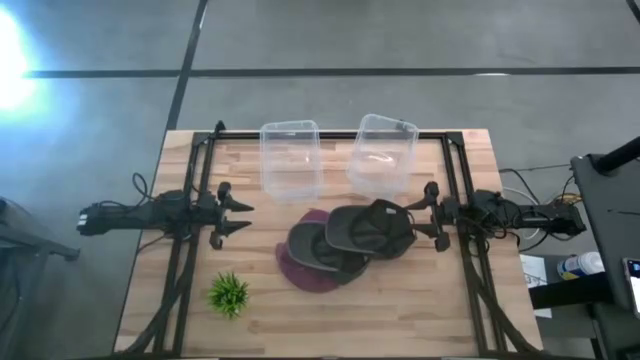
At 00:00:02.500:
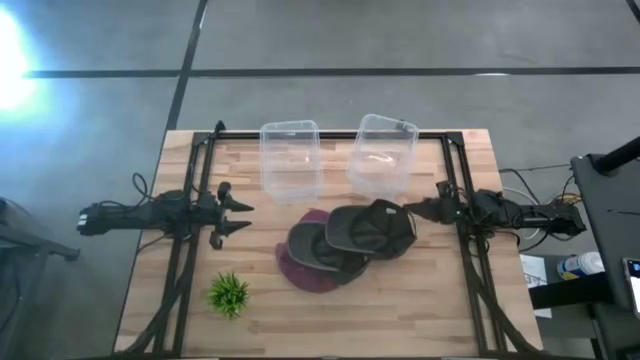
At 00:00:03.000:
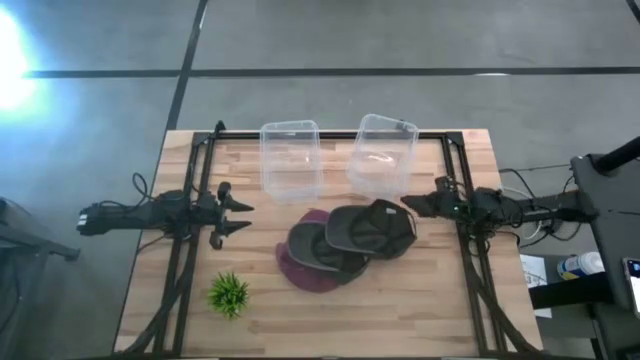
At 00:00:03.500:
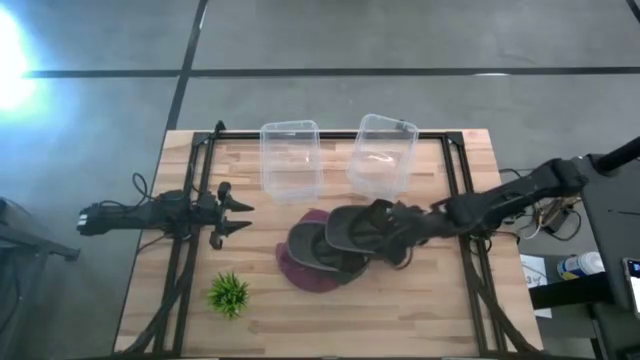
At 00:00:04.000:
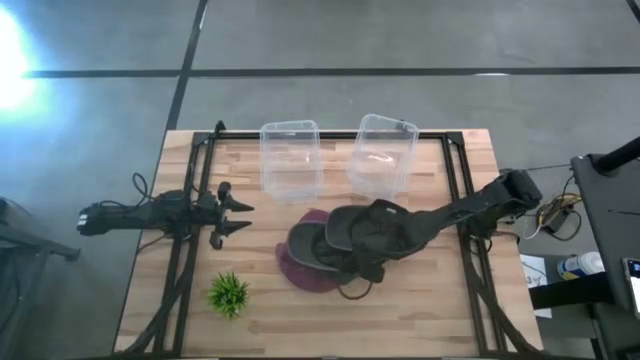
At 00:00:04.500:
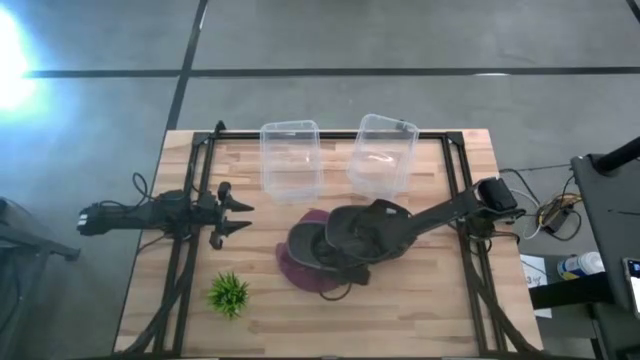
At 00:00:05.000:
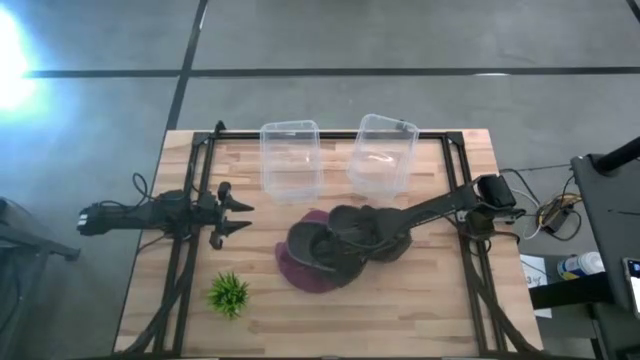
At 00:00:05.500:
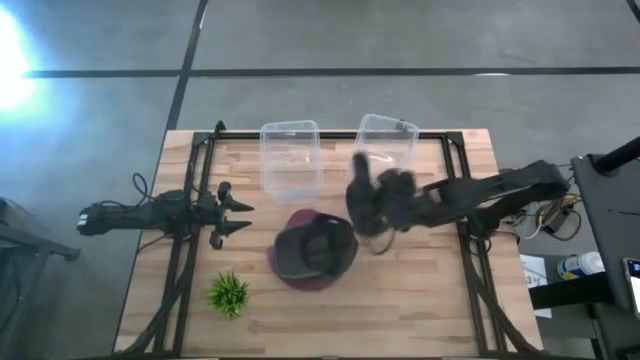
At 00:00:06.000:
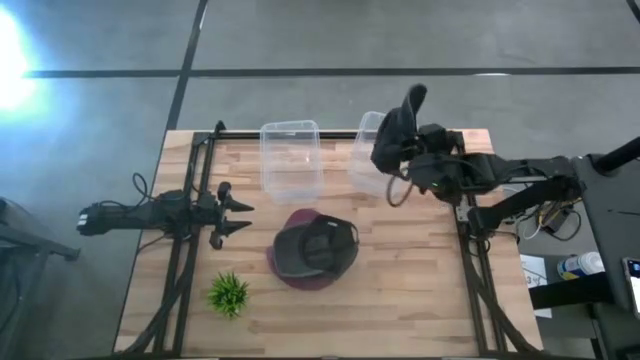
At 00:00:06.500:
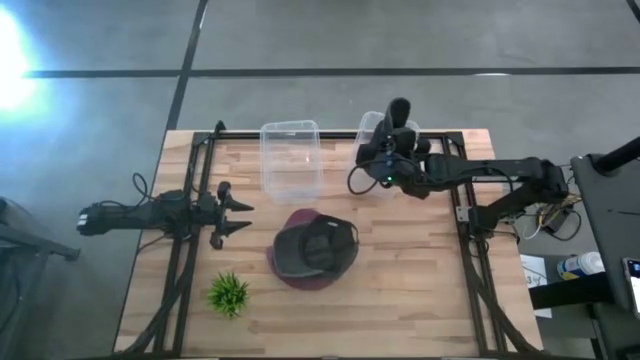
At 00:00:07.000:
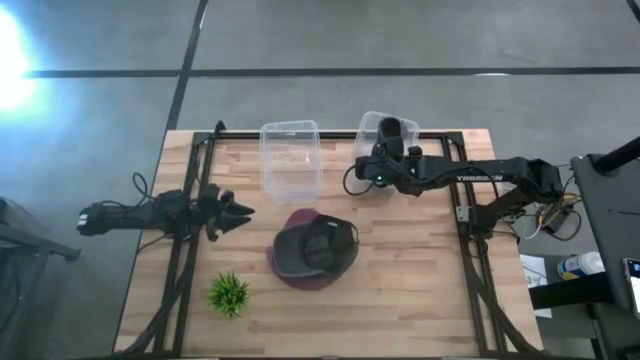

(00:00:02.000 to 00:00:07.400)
Task: Pick & Place hat
Put the right black cap into the right transparent bin

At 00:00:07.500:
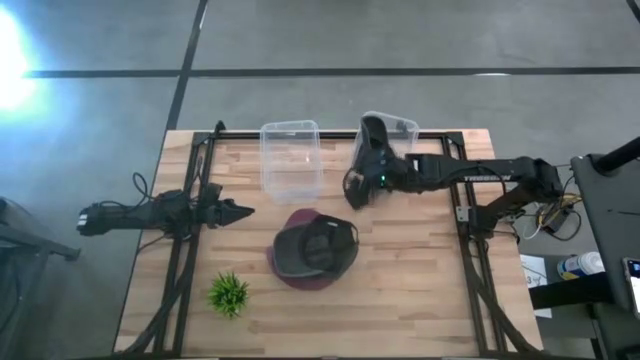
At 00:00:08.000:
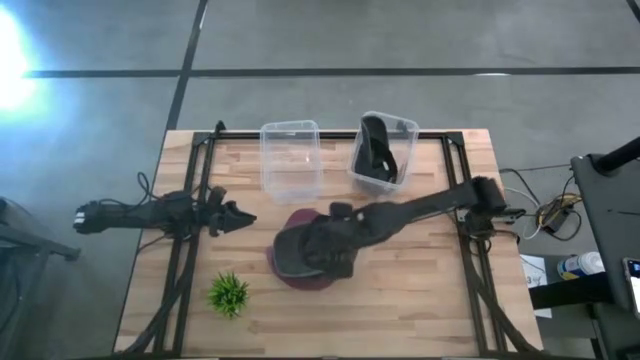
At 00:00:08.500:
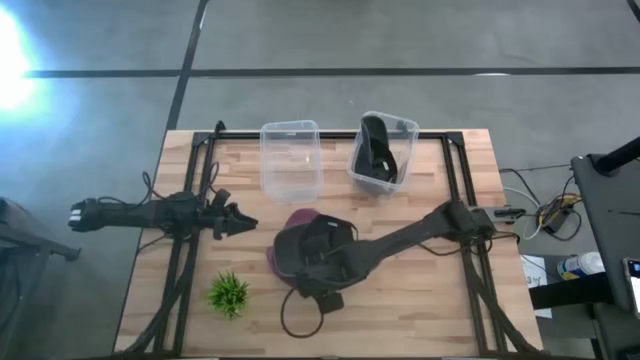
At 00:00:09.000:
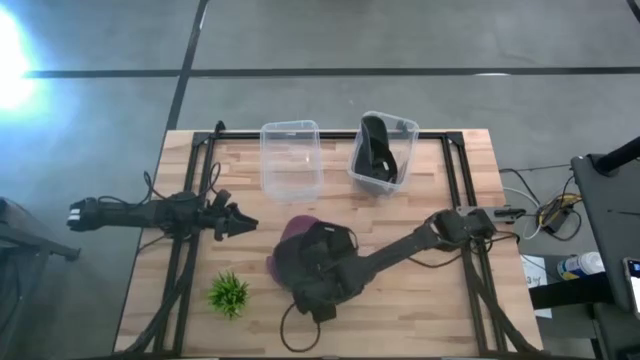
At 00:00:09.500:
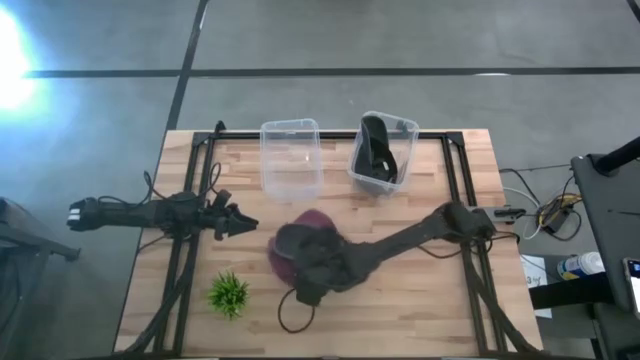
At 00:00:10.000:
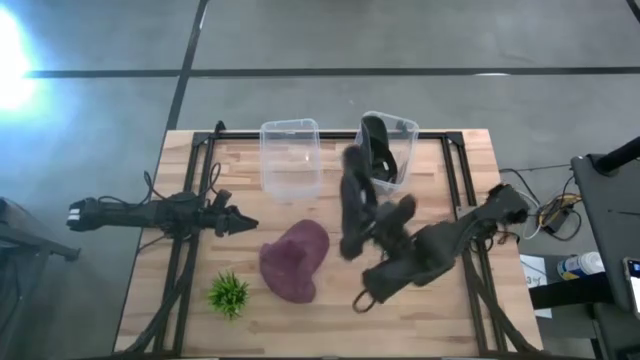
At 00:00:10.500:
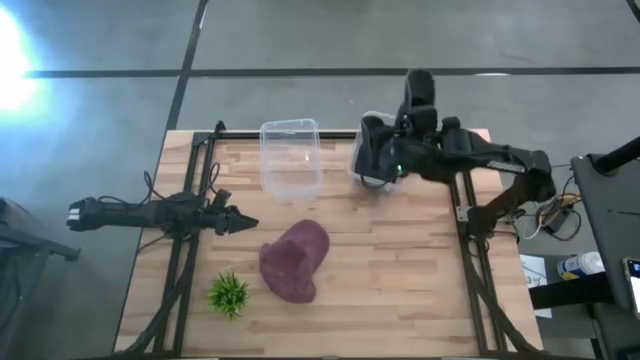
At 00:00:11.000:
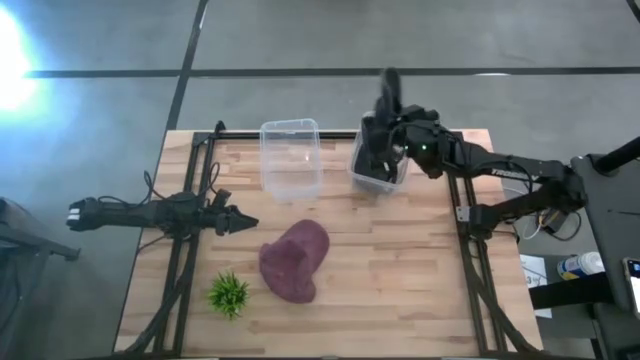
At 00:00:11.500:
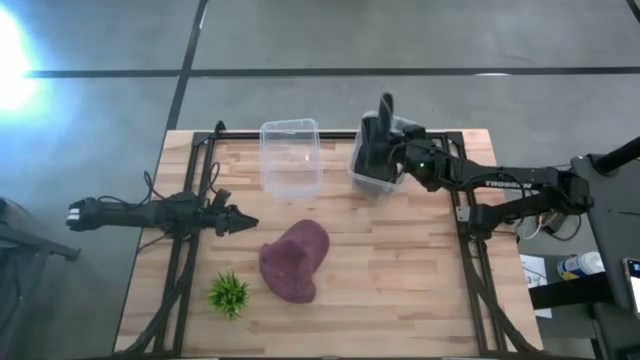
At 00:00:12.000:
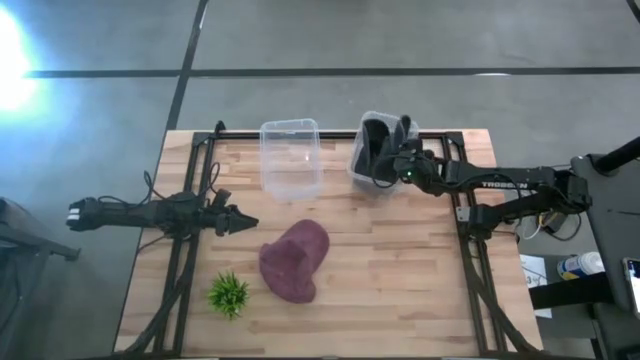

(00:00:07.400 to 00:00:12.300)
Put the black cap into the right transparent bin

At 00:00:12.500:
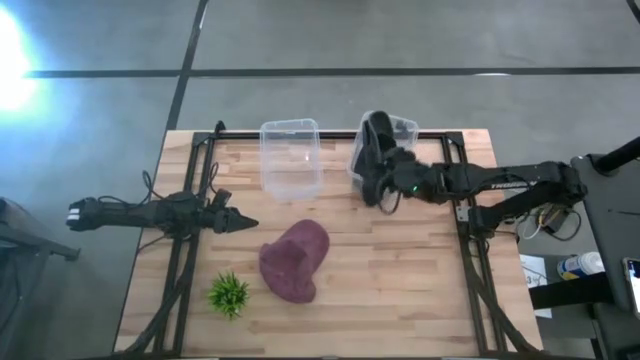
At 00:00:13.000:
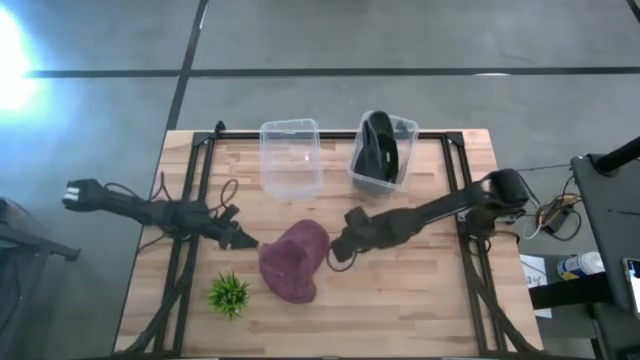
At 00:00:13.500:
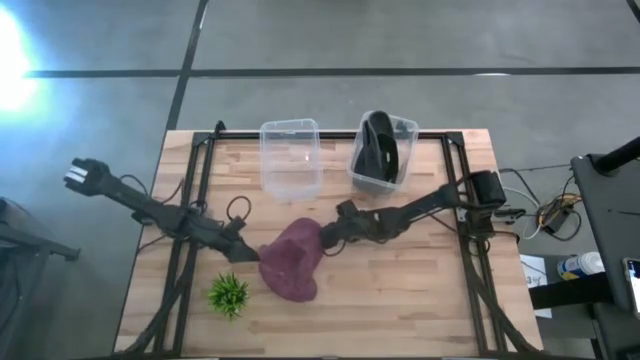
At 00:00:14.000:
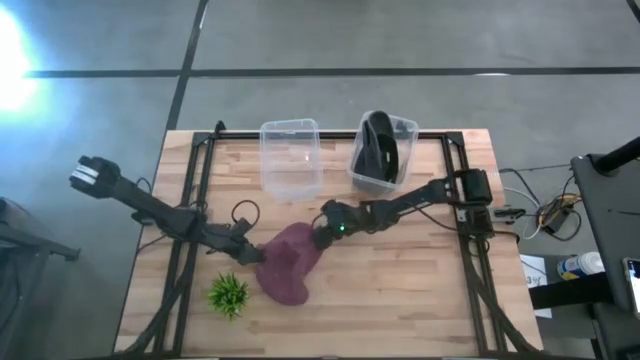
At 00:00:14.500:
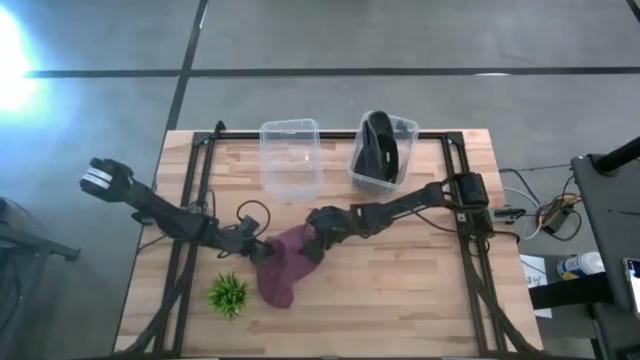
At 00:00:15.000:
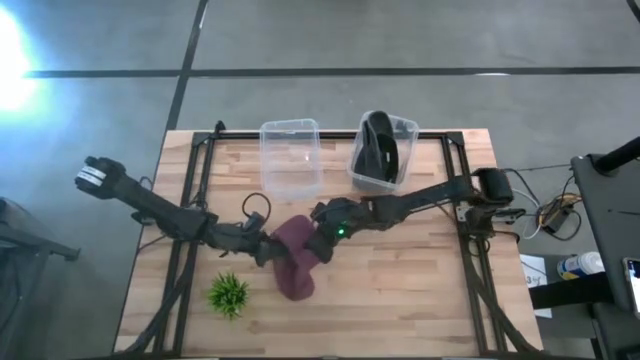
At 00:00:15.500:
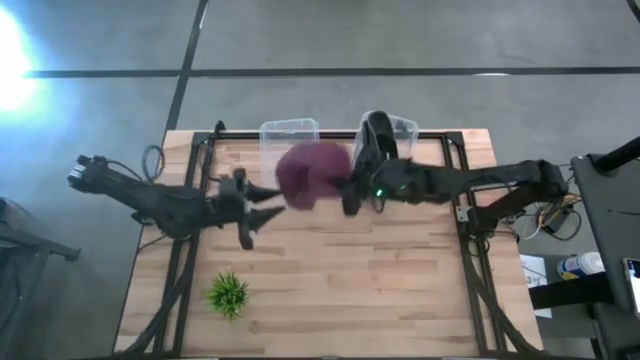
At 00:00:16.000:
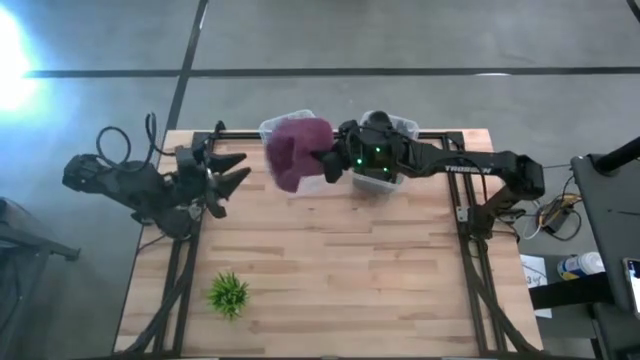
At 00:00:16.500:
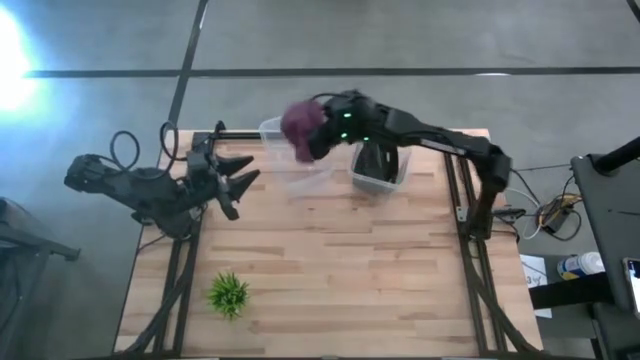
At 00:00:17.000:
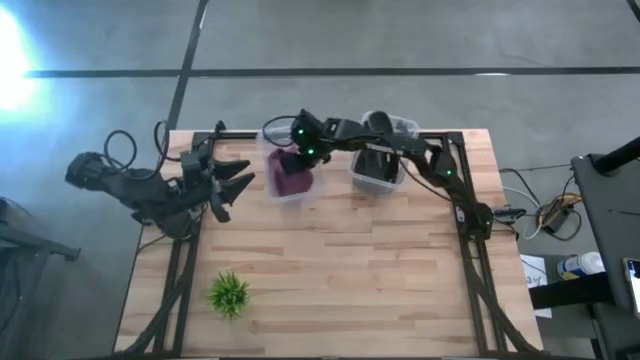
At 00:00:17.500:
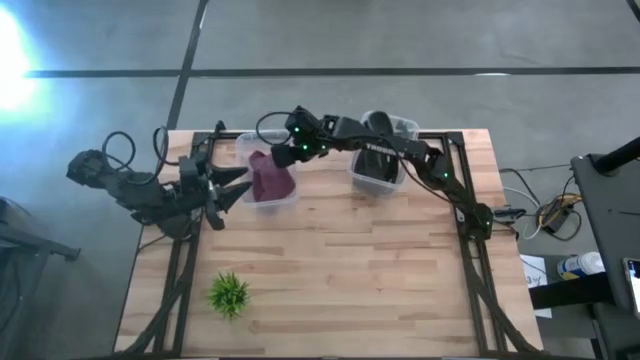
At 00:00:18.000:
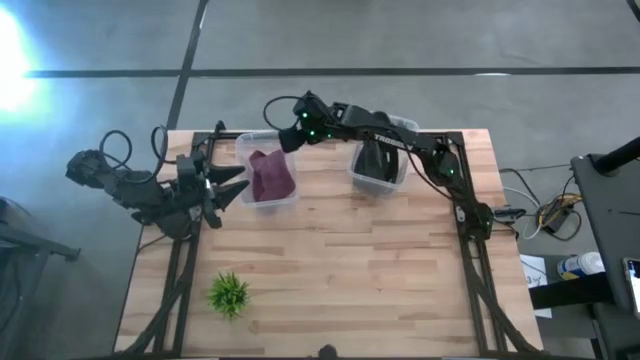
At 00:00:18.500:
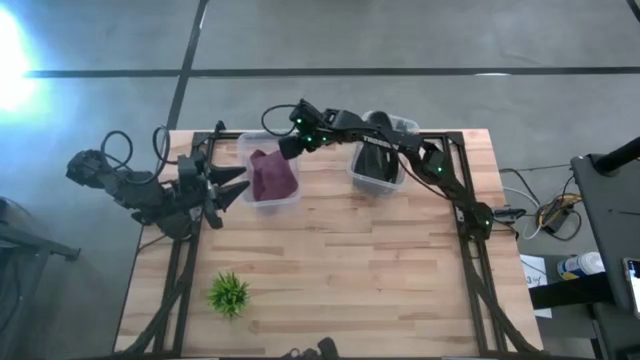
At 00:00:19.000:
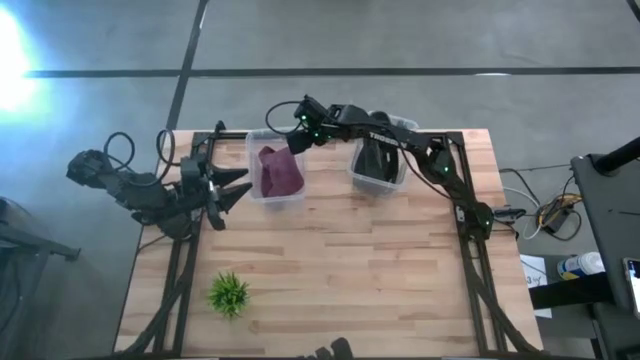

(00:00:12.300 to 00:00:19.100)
Put the red cap into the left transparent bin

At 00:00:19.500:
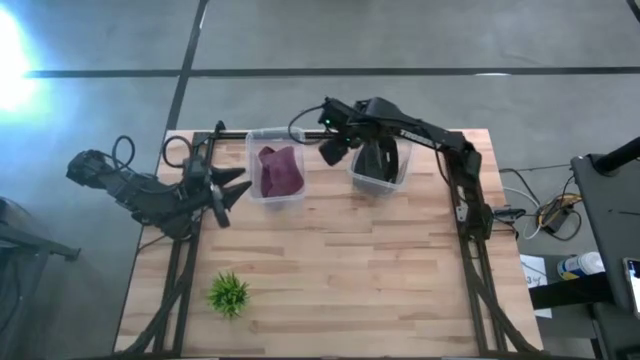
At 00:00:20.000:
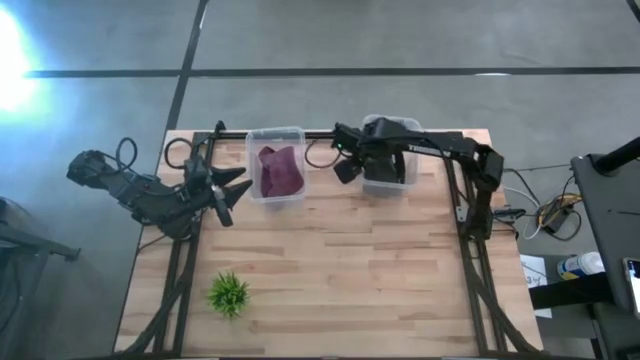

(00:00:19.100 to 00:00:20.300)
Adjust the right transparent bin

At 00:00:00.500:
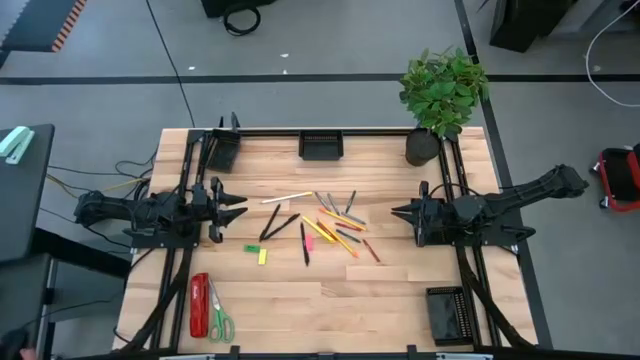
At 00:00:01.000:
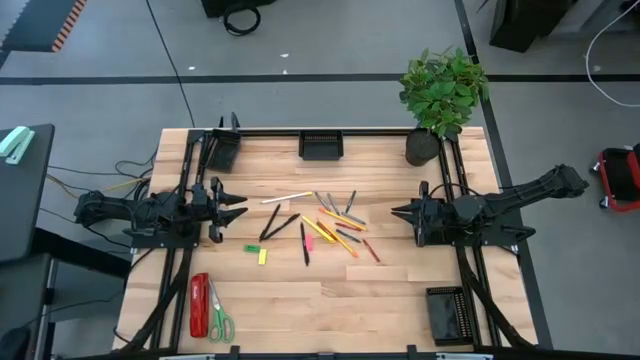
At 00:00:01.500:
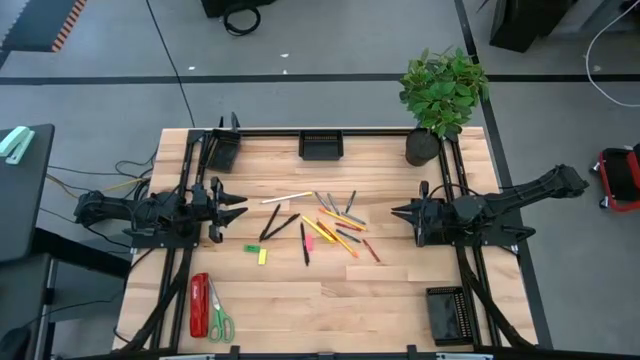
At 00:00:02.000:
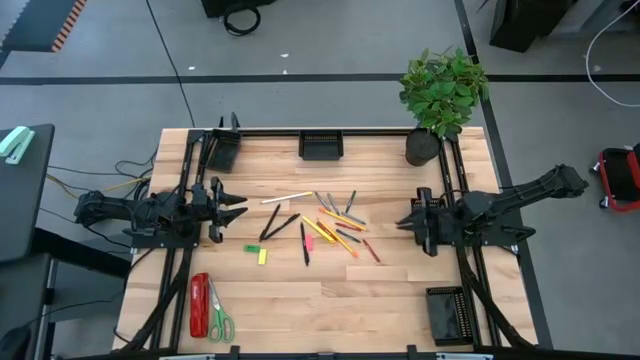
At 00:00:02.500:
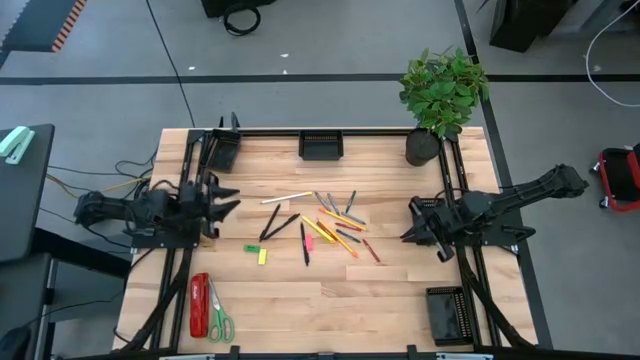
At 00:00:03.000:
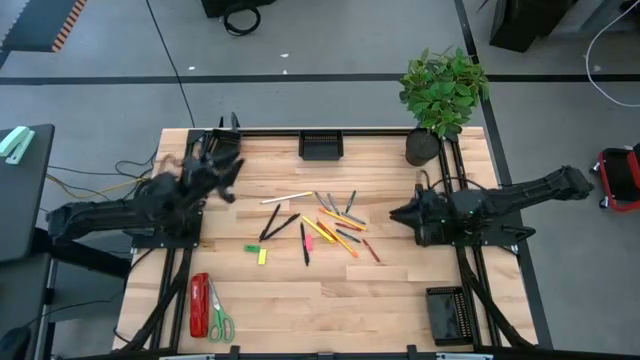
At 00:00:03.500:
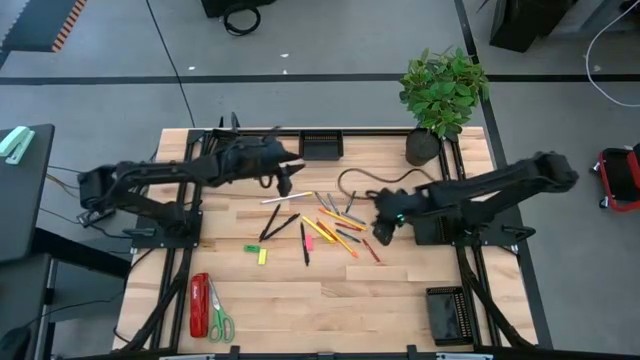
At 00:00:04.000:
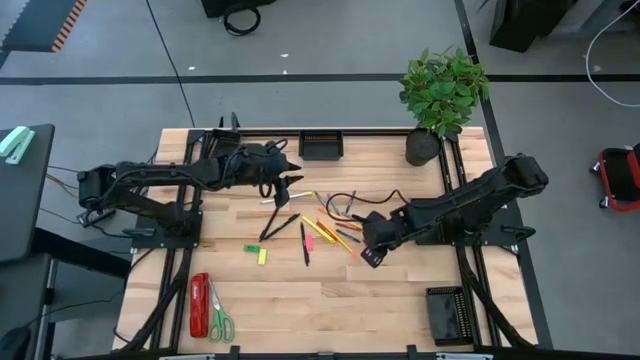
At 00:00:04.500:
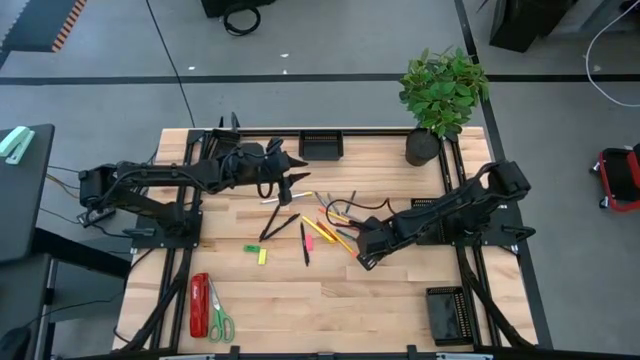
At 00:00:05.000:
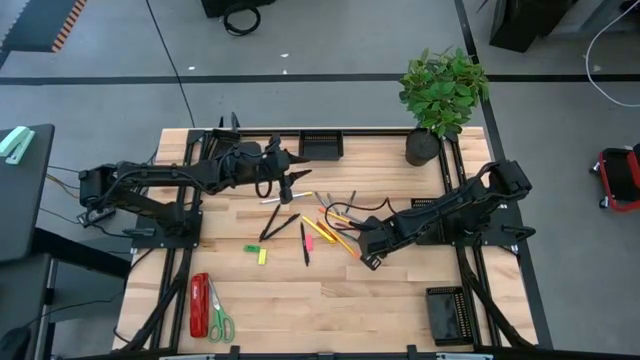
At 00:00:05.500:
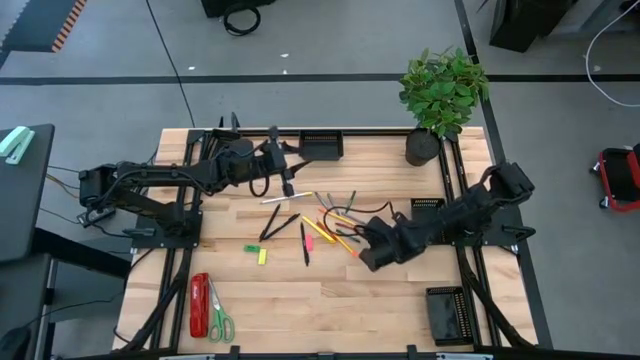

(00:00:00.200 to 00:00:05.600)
Task: Sort crayons/erasers/pens/pencils in bins
Put the red crayon into the middle right black bin
